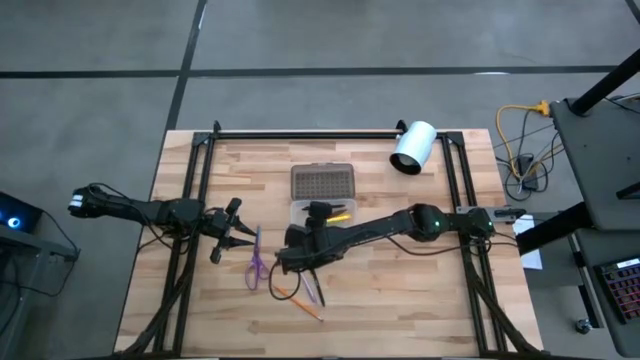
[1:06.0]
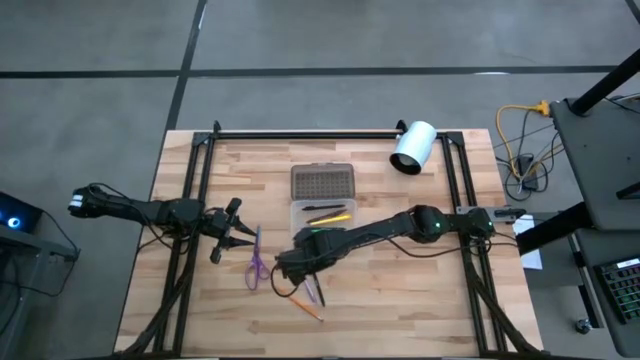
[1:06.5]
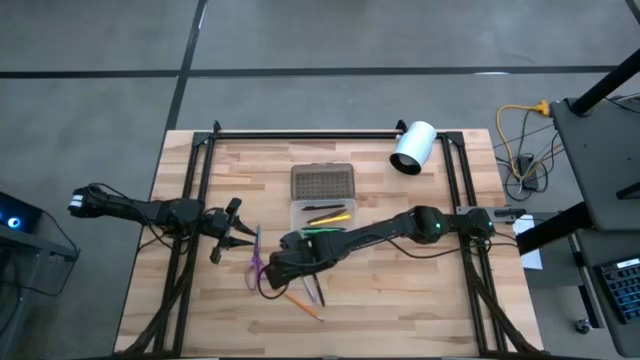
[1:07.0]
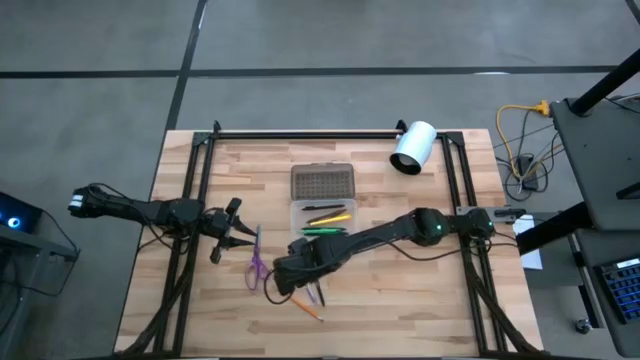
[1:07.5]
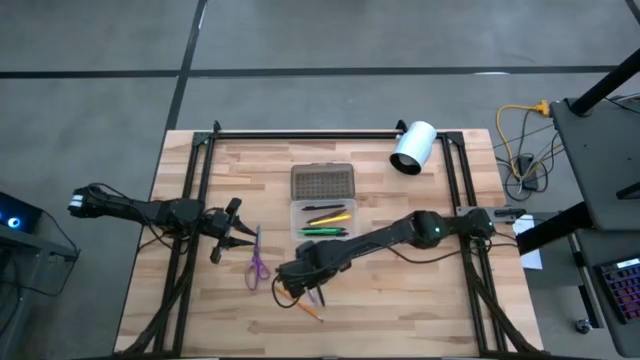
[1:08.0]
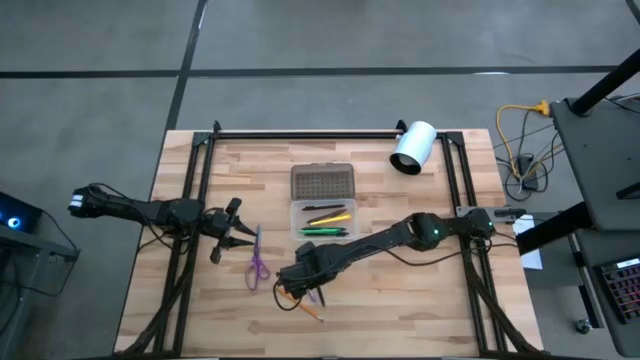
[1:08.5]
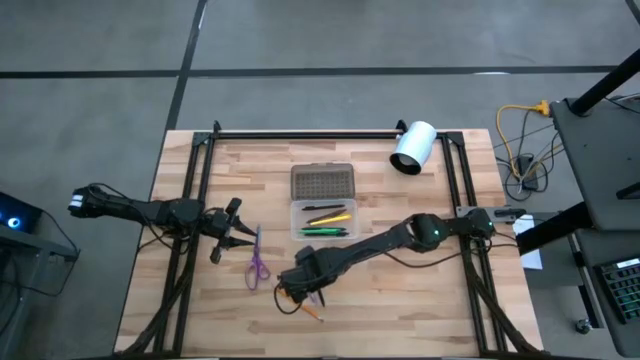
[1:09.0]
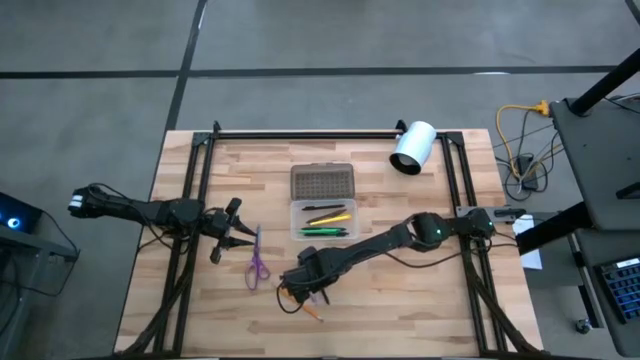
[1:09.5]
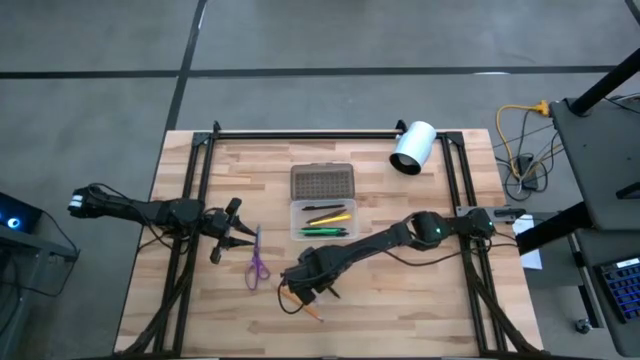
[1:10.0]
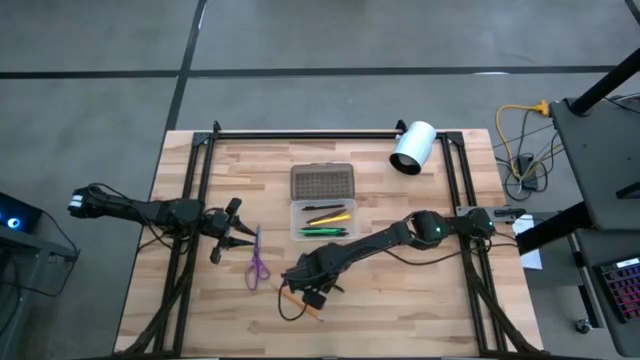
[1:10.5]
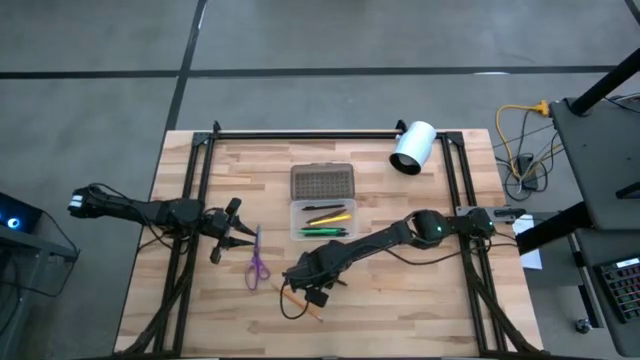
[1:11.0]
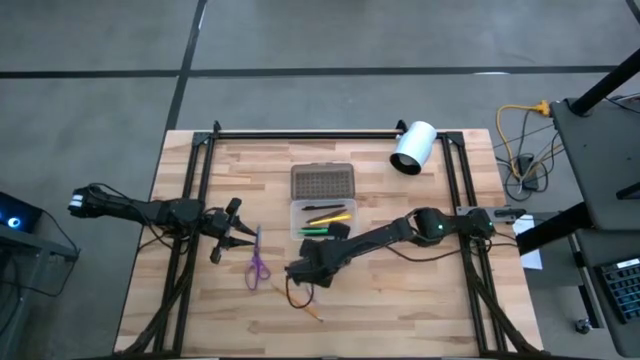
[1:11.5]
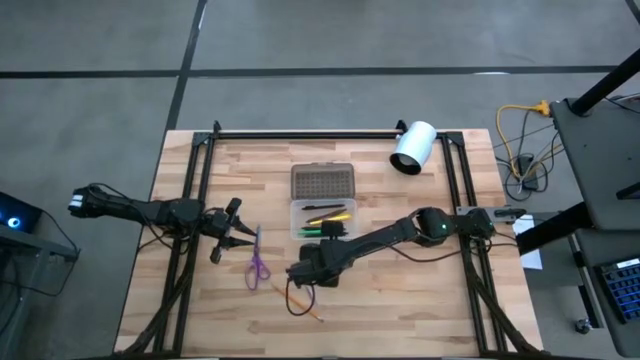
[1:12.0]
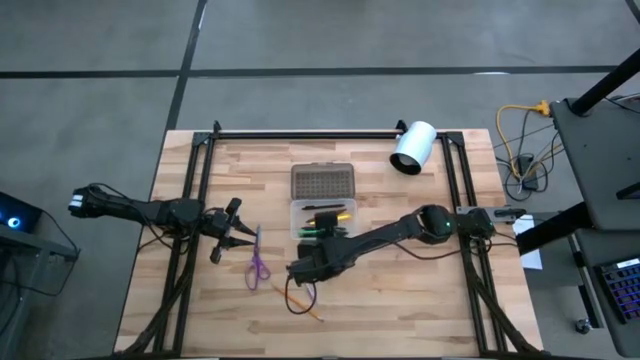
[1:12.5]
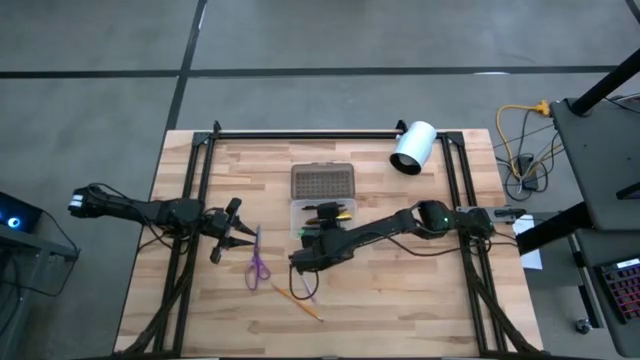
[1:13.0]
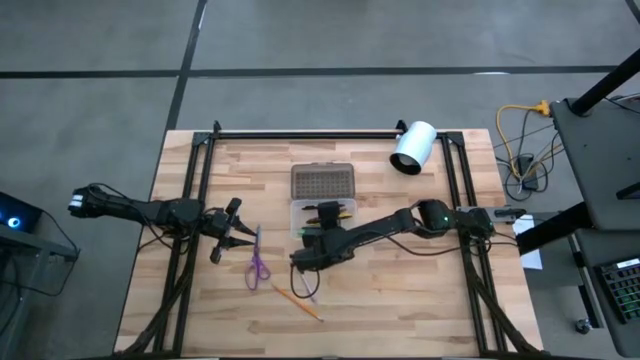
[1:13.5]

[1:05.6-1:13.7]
Task: Pick & place school supplies into a supply box
Put the black pen into the supply box

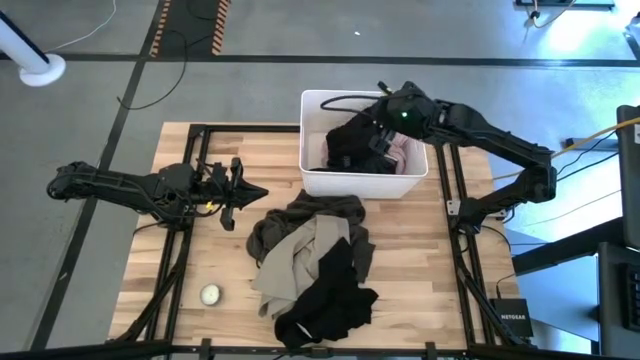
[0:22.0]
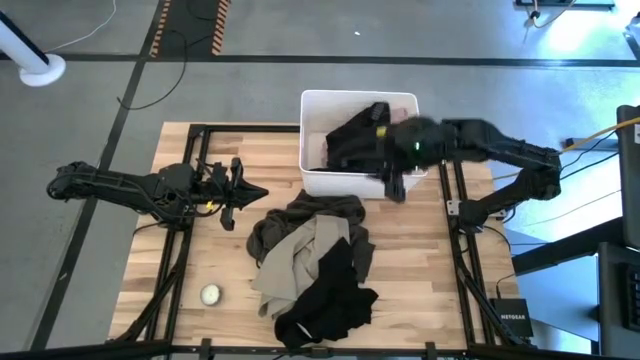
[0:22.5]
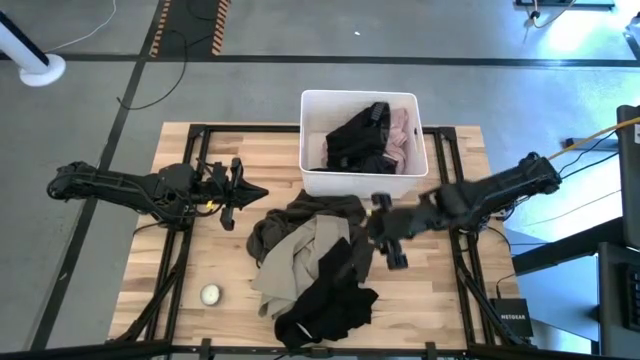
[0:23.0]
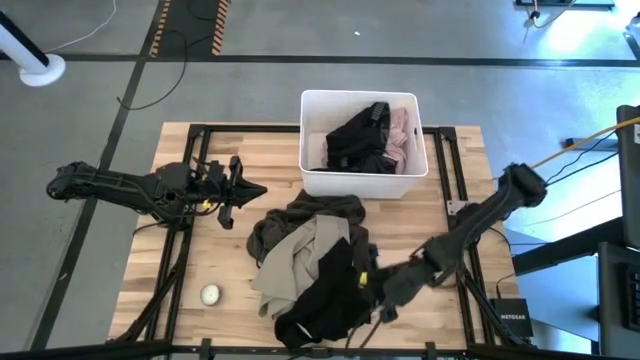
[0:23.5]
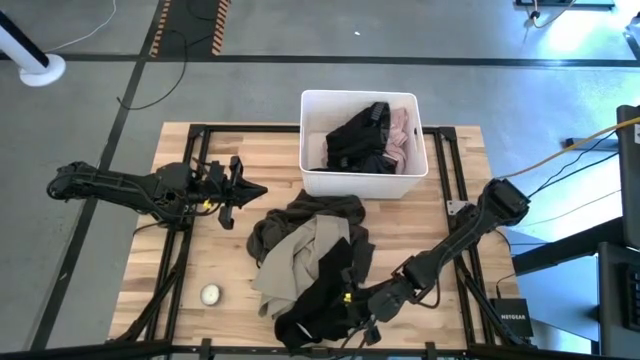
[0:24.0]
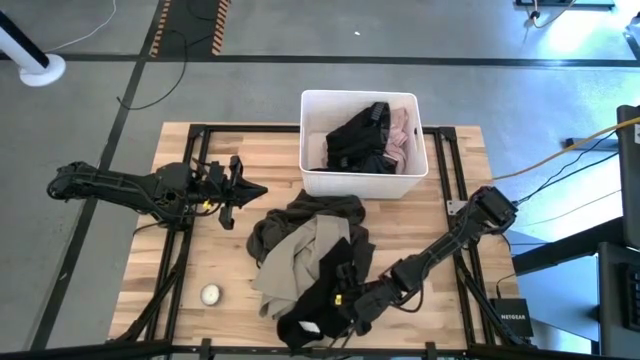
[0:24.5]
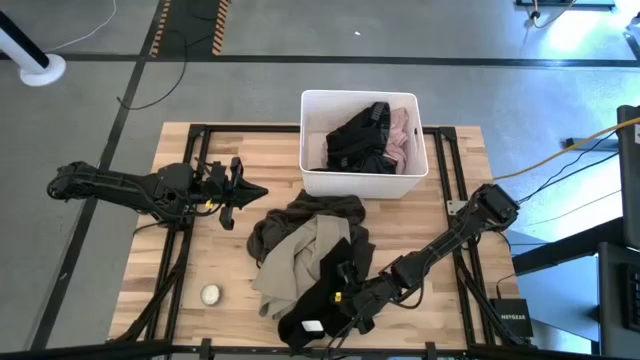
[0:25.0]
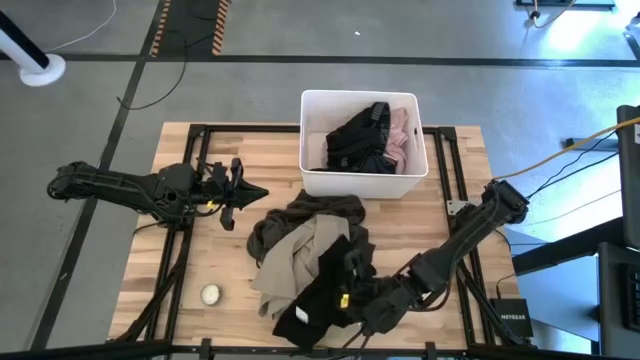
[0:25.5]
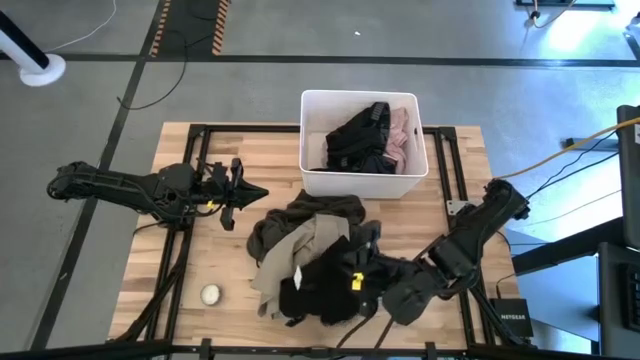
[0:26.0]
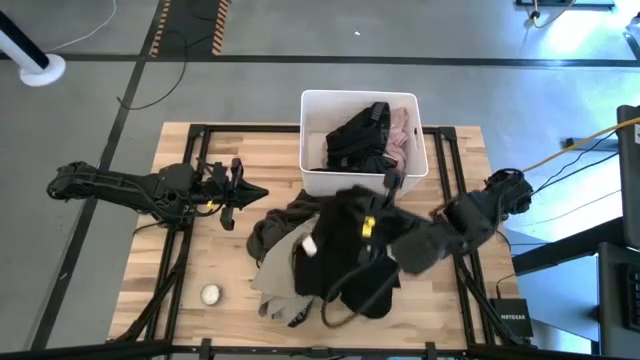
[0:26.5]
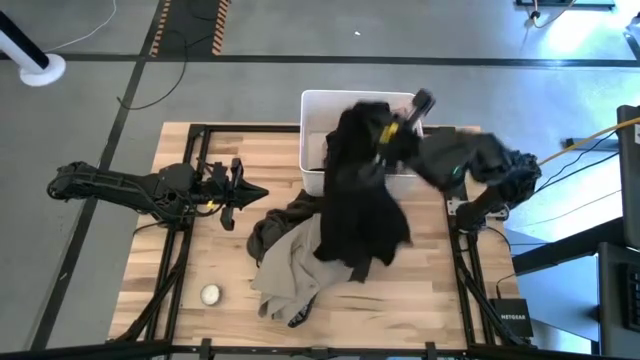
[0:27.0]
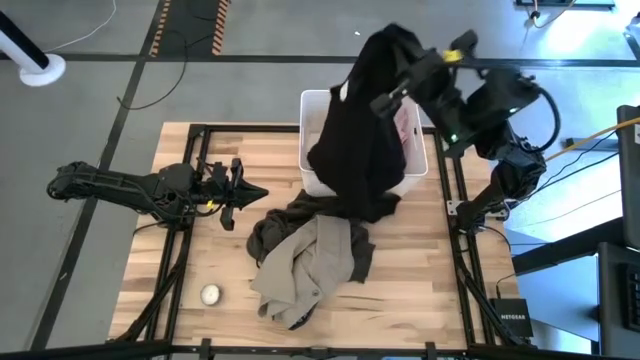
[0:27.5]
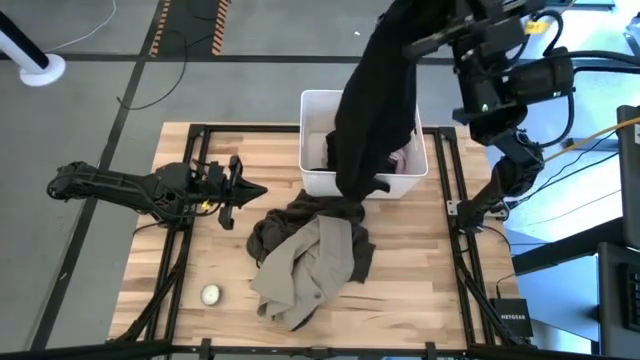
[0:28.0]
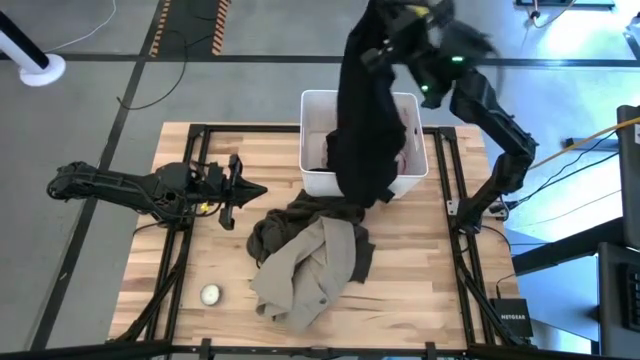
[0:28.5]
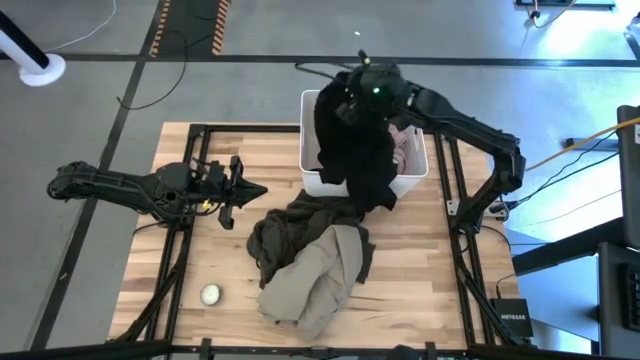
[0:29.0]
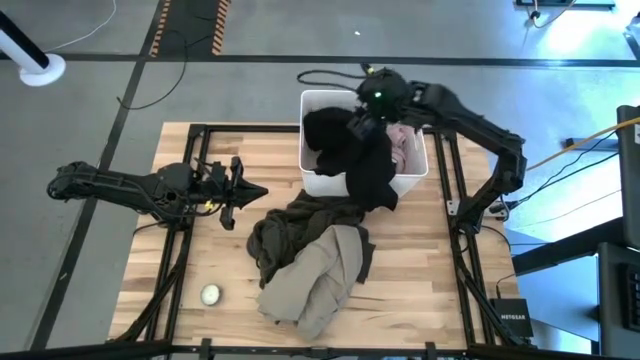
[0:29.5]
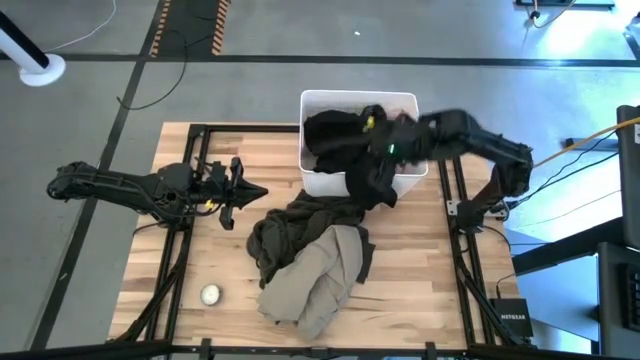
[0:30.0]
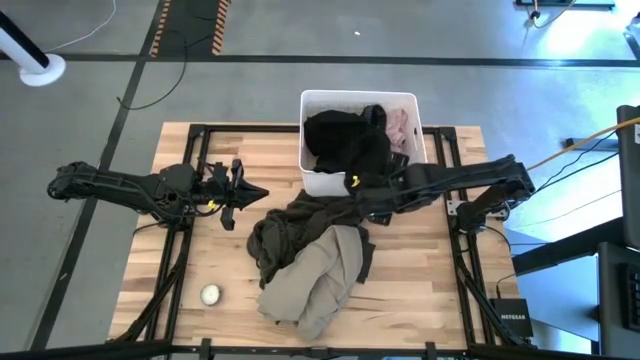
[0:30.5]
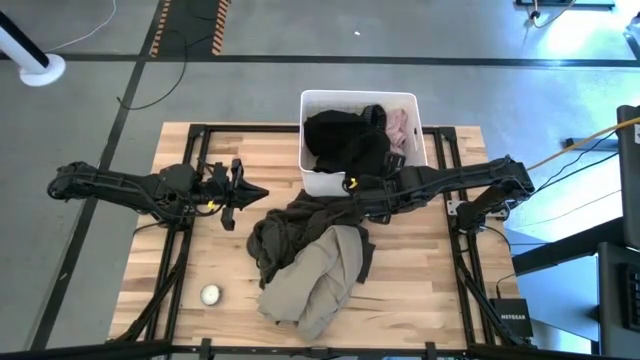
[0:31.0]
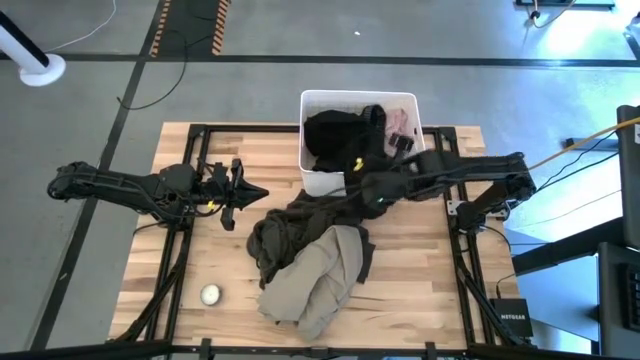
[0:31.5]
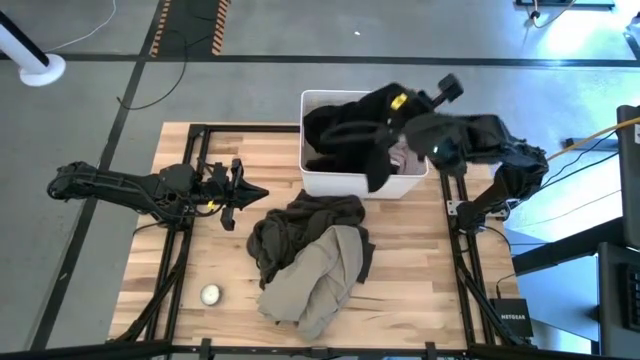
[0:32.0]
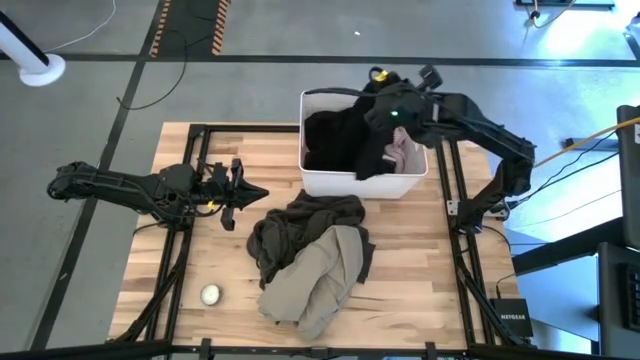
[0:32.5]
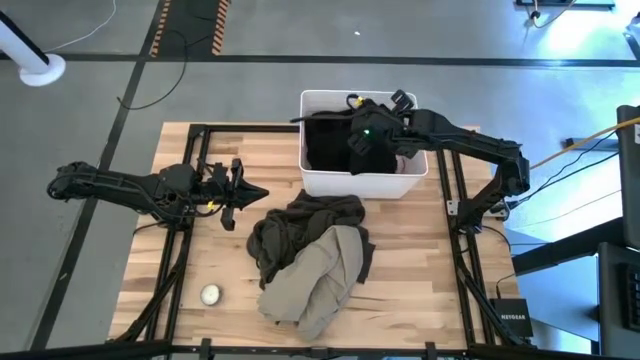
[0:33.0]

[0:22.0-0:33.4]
Task: Sort clothes
Put the black shirt into the white laundry bin
